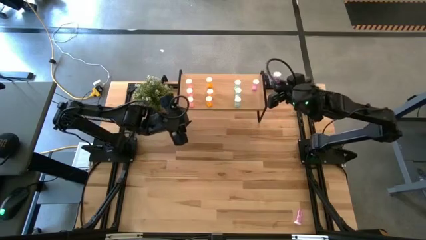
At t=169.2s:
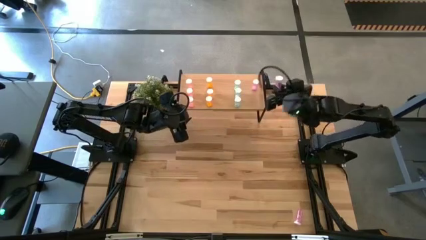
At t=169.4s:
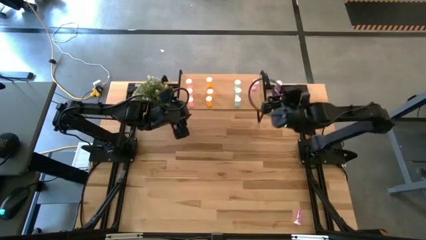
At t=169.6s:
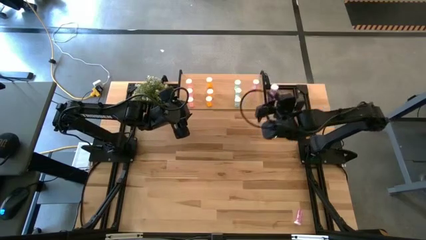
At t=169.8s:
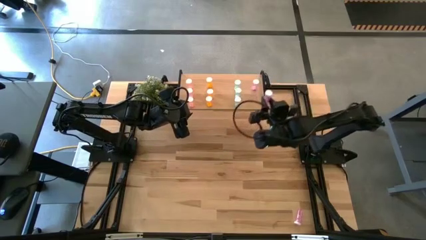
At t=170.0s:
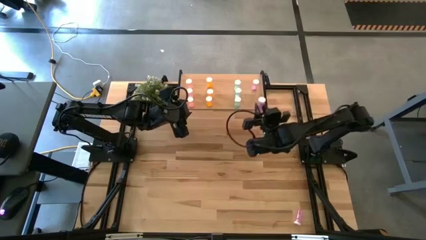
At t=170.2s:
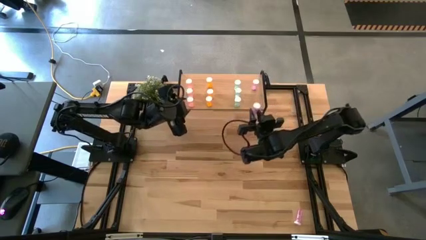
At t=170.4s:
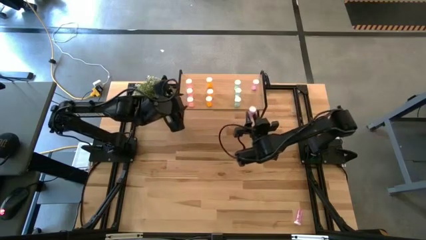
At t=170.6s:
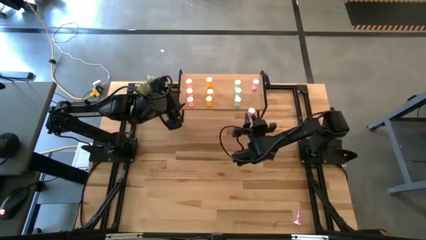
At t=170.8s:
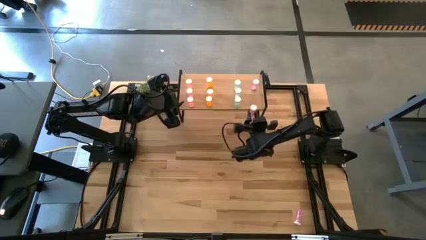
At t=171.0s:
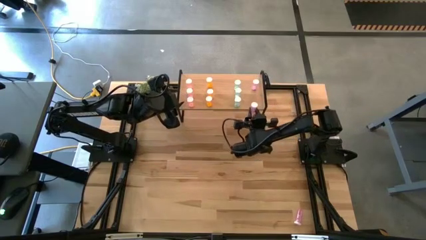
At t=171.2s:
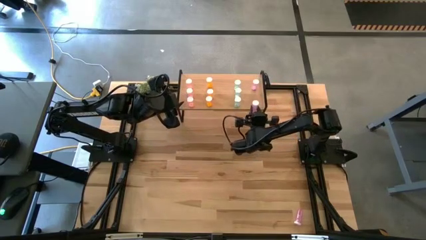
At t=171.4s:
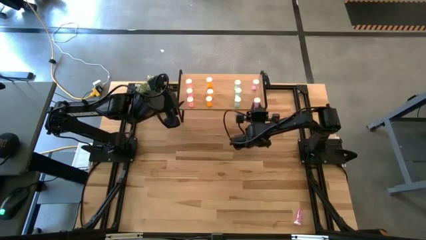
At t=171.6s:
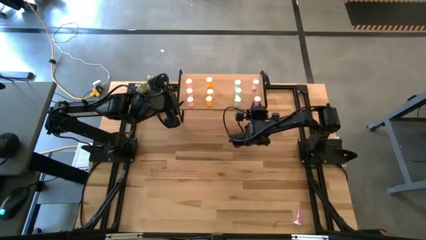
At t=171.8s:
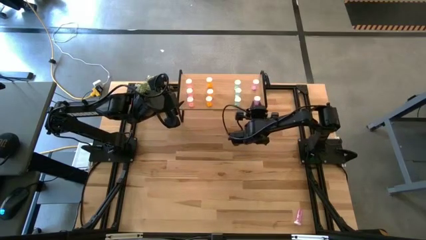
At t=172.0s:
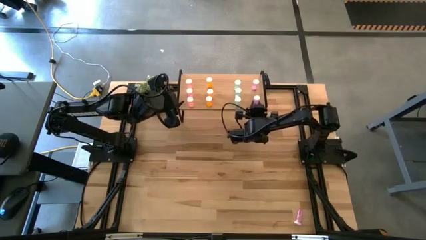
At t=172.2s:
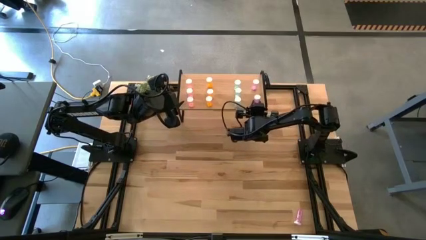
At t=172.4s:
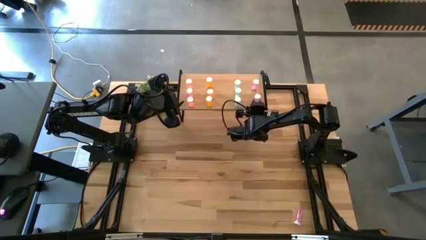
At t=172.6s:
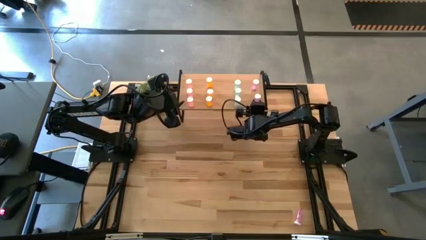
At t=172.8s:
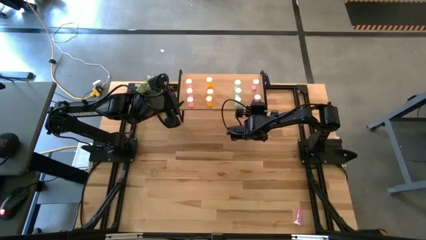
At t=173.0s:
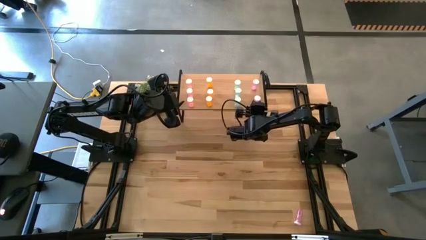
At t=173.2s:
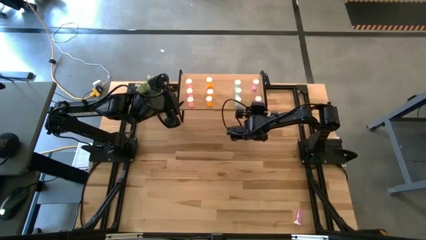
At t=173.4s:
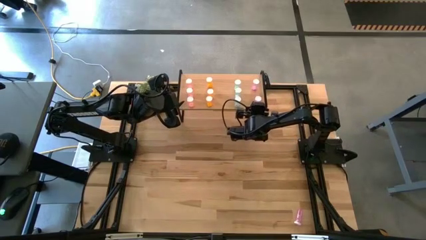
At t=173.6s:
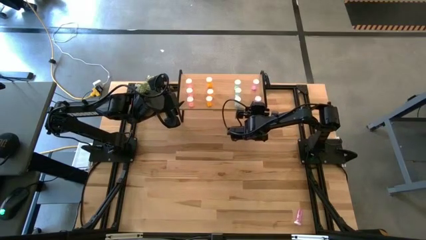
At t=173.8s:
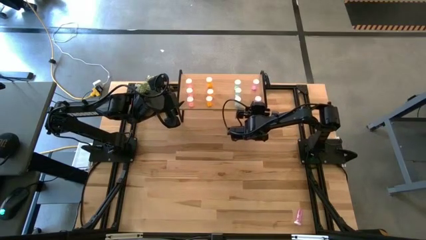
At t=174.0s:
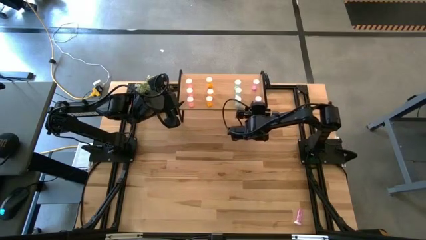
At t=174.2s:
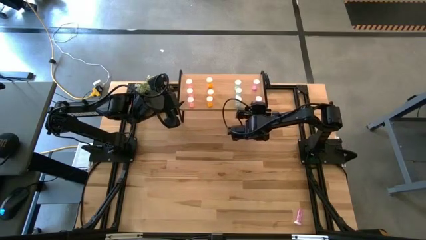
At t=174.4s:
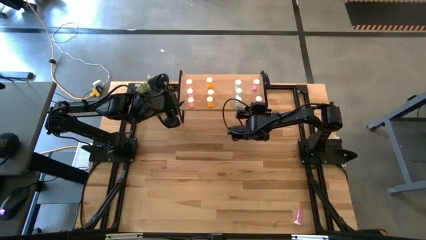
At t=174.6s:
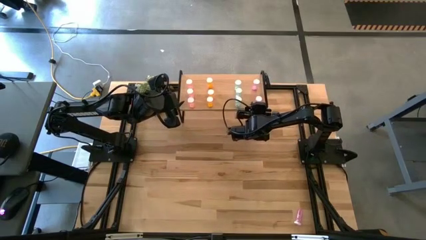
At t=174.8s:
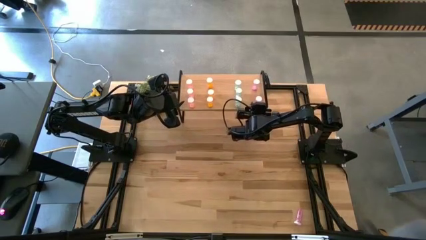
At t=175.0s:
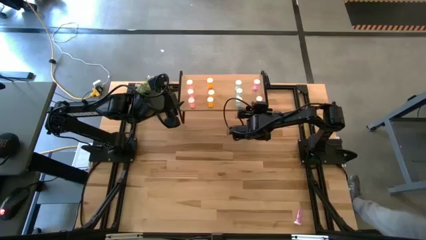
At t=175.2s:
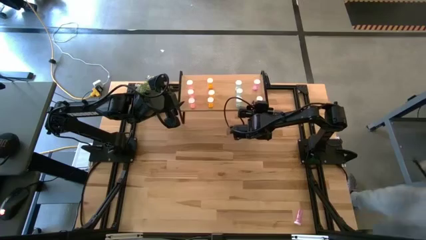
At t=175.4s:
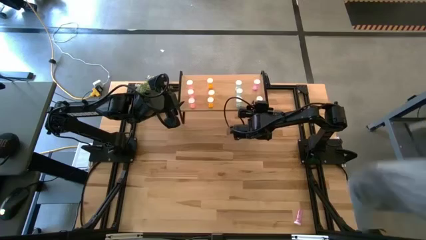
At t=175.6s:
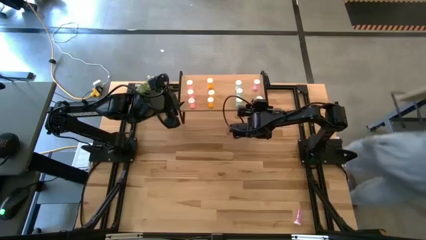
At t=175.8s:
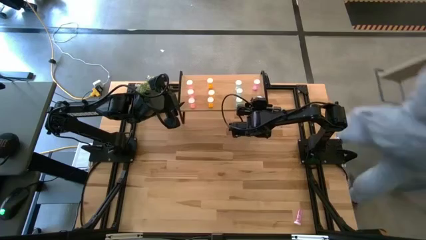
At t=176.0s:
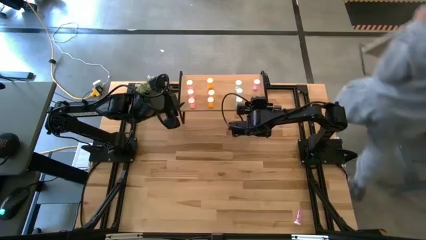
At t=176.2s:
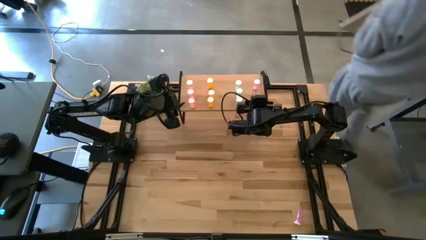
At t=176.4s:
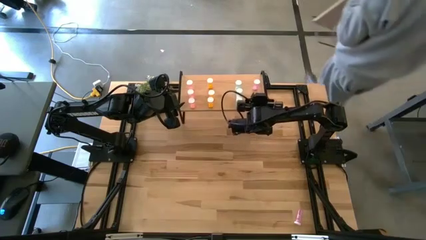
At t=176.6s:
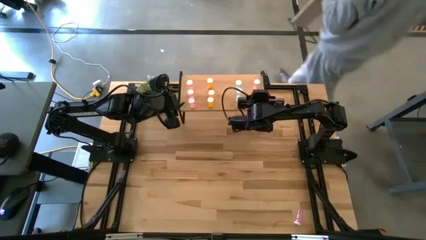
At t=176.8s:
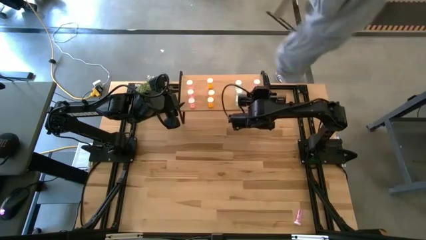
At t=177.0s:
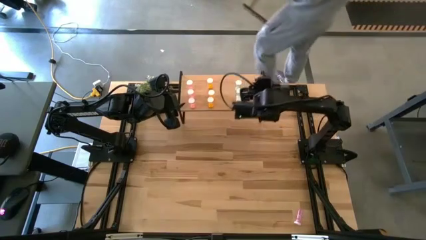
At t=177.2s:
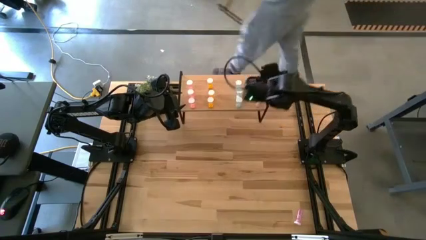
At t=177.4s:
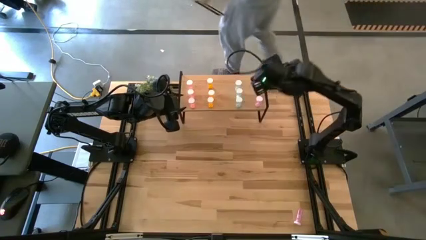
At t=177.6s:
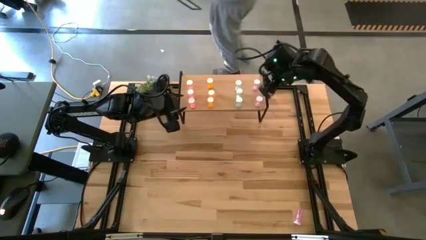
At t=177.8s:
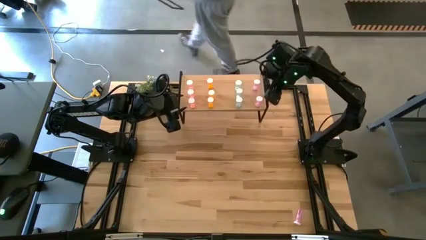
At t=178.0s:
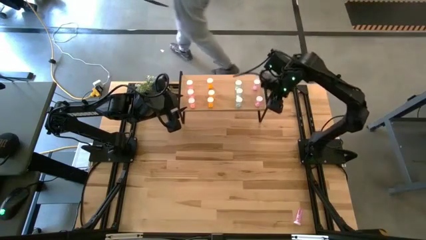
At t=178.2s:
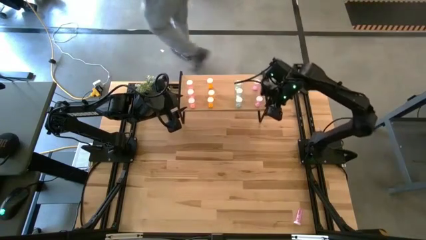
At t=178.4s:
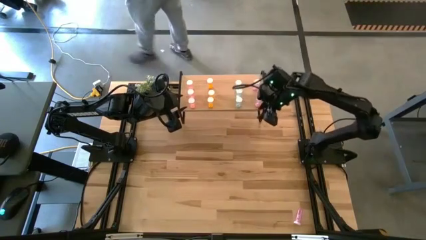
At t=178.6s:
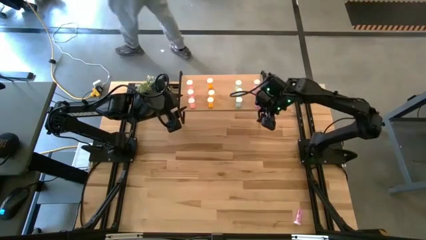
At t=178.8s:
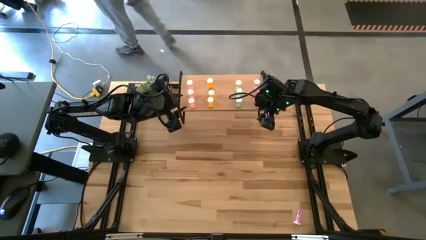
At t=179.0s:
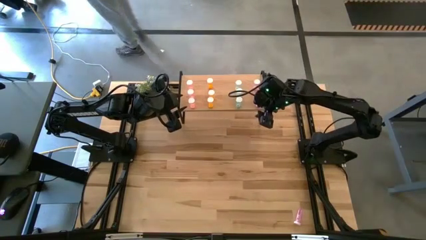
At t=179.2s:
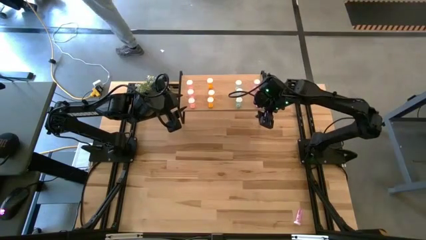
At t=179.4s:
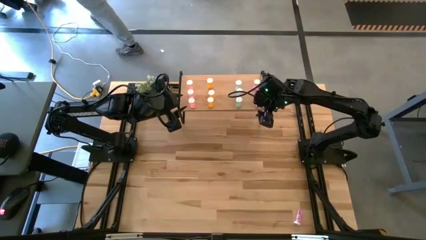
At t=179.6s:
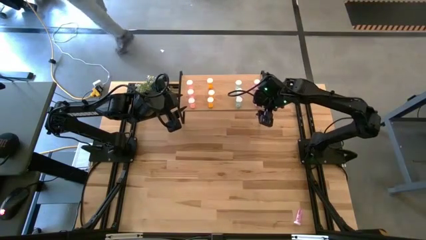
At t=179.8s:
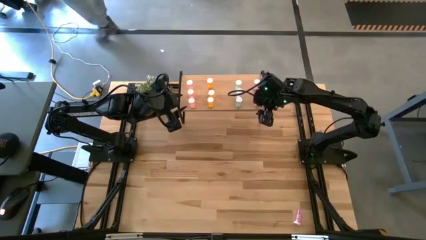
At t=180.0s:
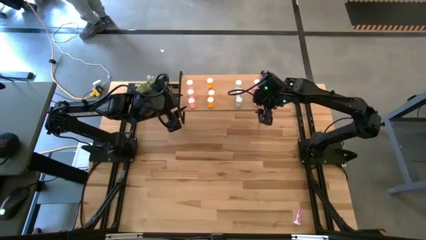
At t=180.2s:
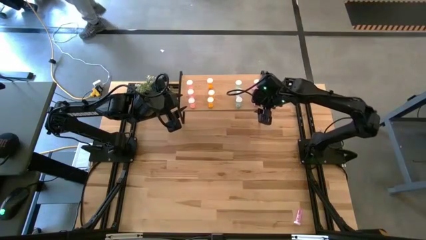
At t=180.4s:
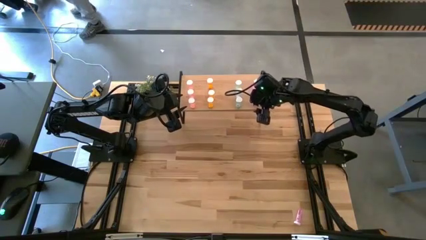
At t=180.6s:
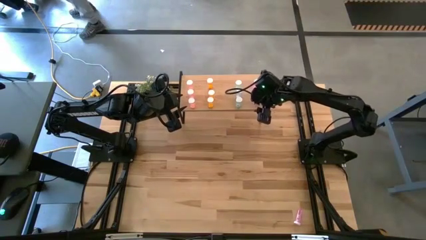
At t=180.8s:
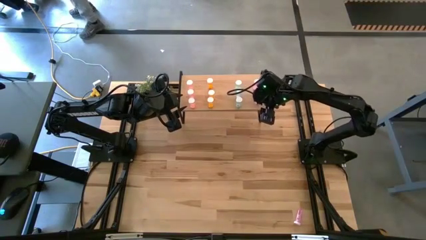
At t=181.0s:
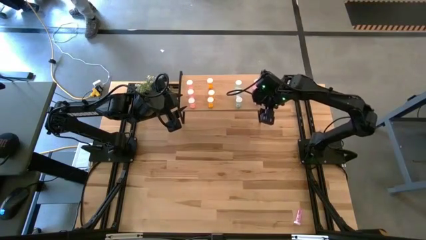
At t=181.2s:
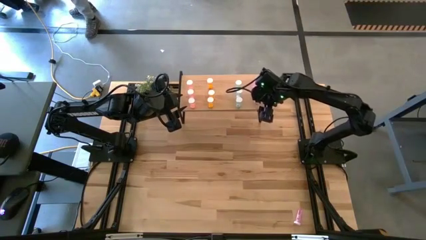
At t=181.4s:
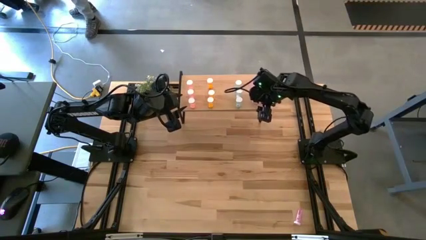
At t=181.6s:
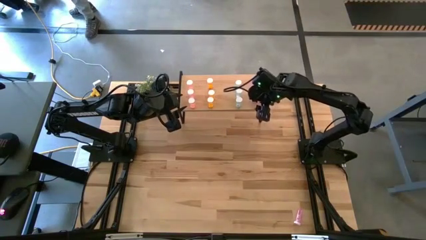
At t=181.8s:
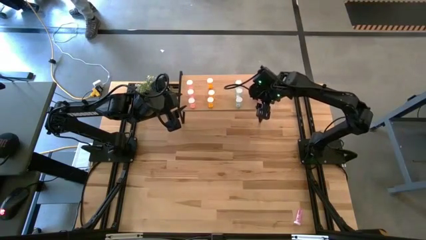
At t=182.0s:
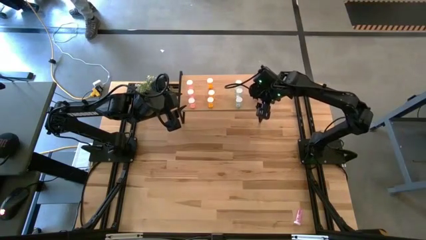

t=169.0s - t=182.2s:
Task: Pick and place medicine bottles onto shelf by color
Put the top violet pill bottle on the shelf aligned with the other violet pill bottle
